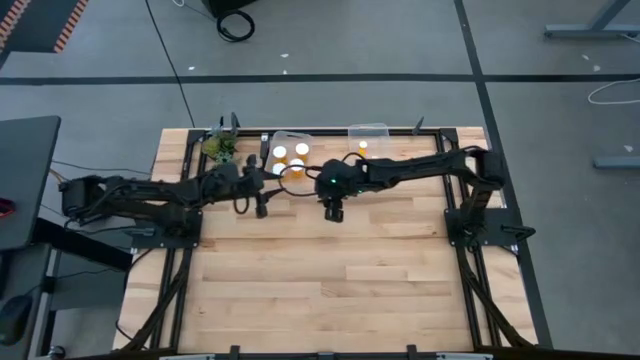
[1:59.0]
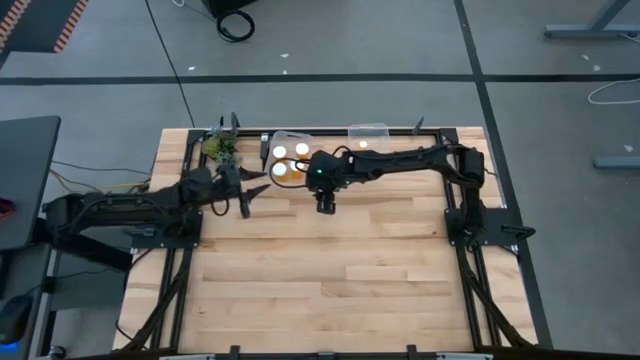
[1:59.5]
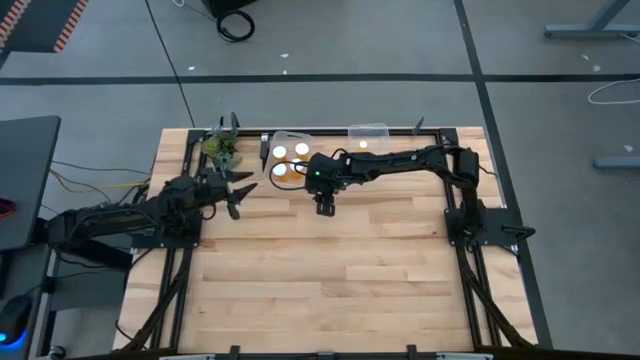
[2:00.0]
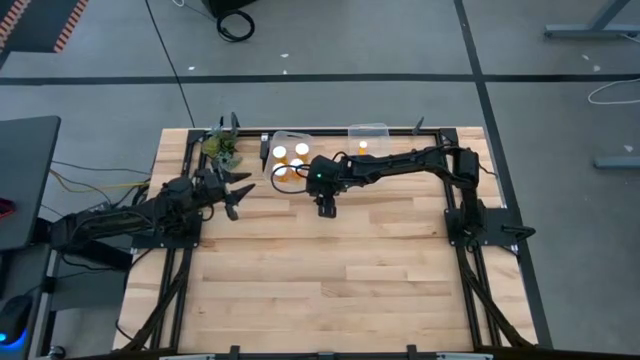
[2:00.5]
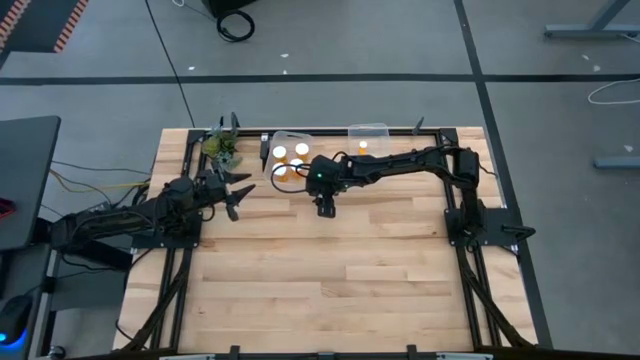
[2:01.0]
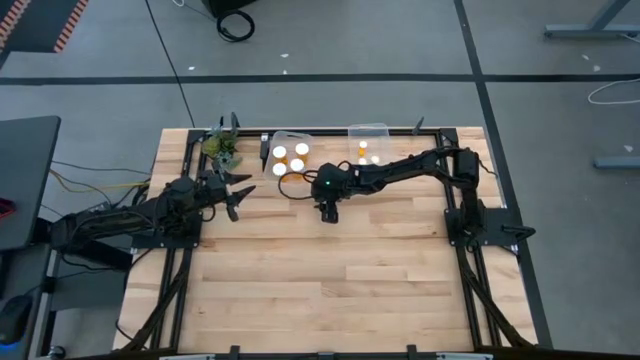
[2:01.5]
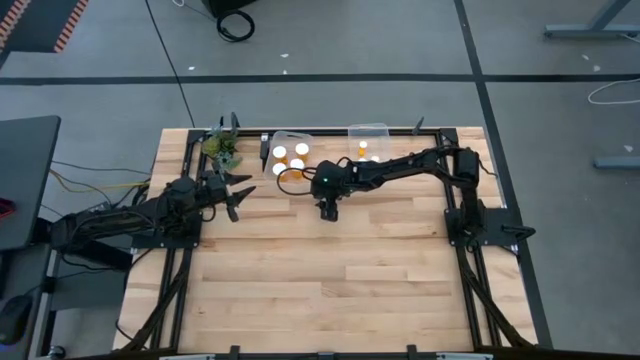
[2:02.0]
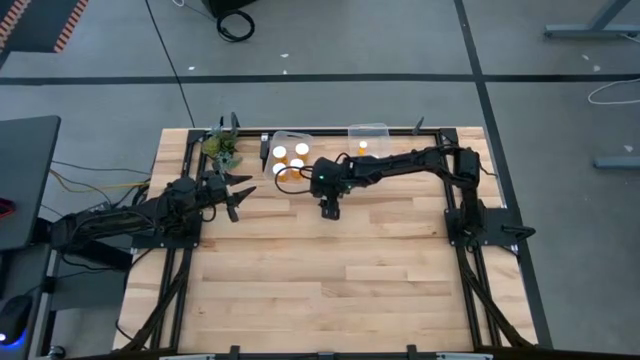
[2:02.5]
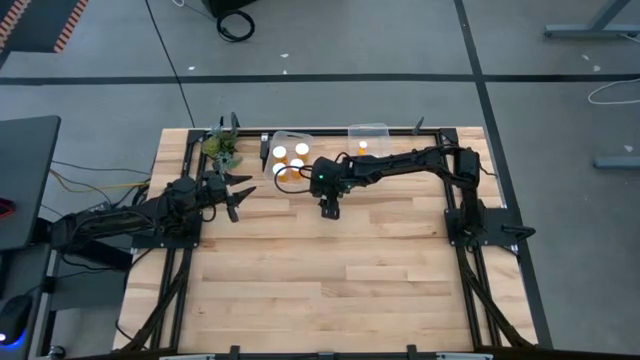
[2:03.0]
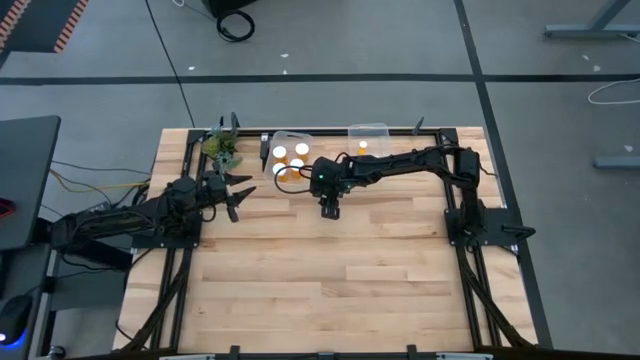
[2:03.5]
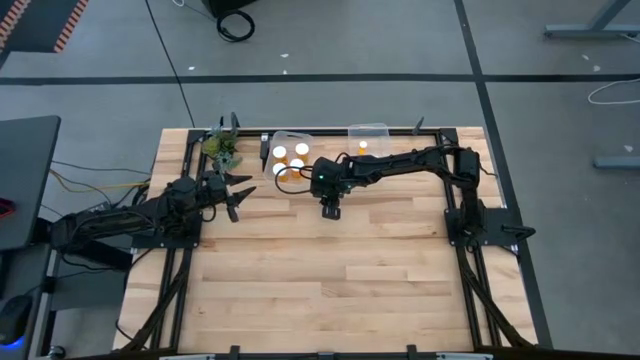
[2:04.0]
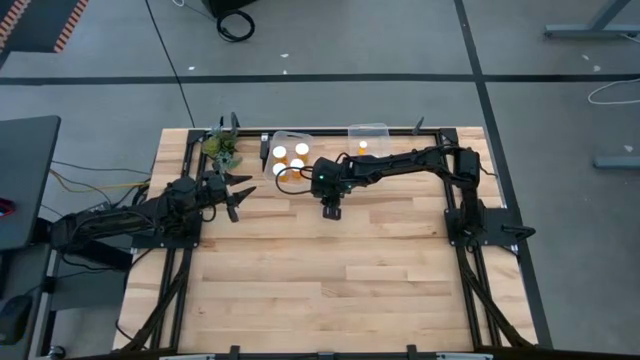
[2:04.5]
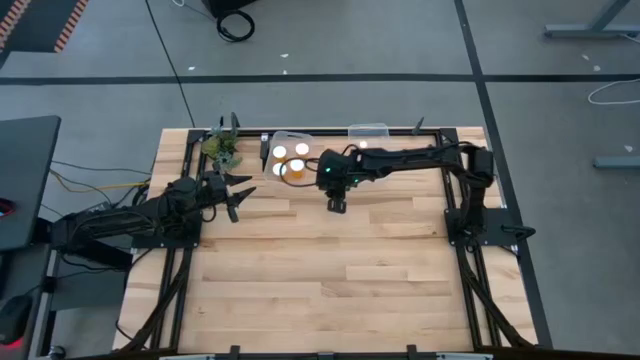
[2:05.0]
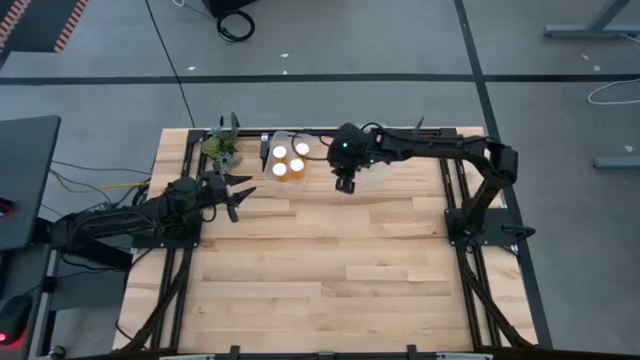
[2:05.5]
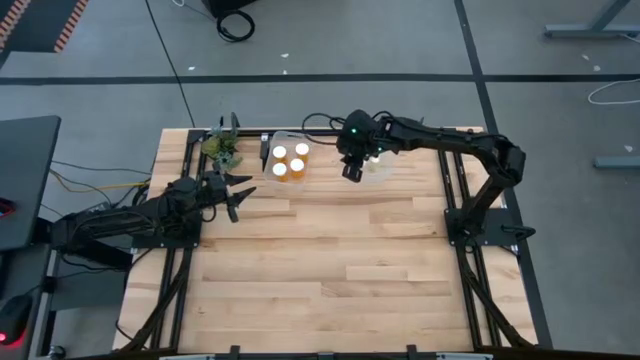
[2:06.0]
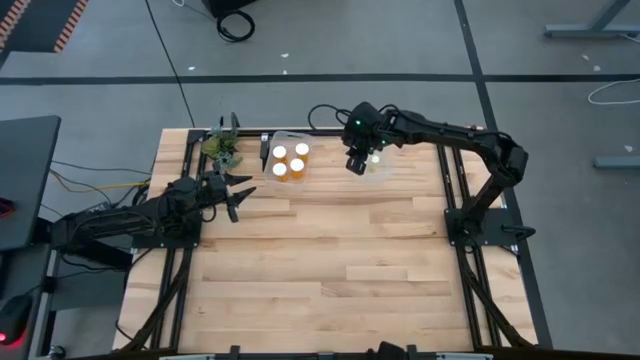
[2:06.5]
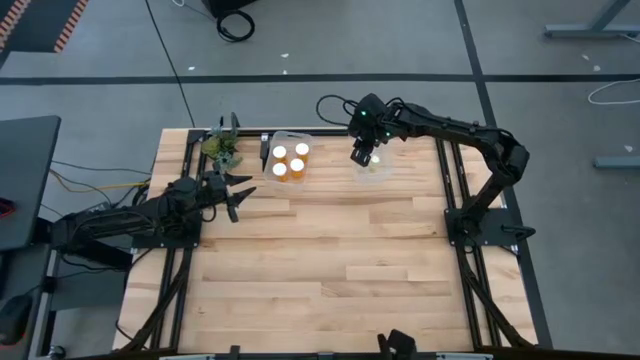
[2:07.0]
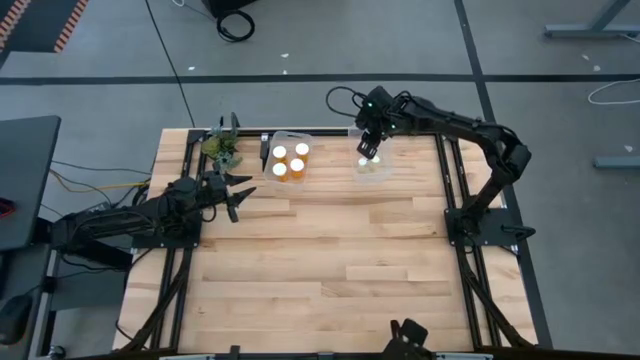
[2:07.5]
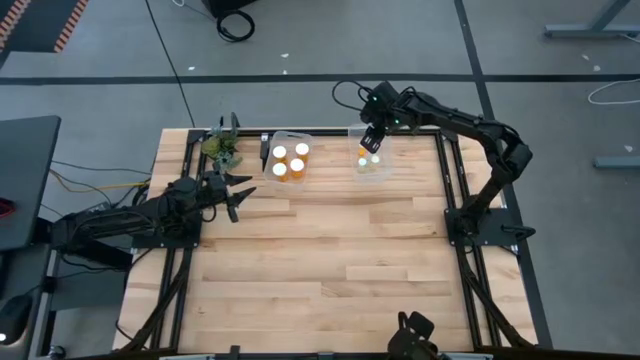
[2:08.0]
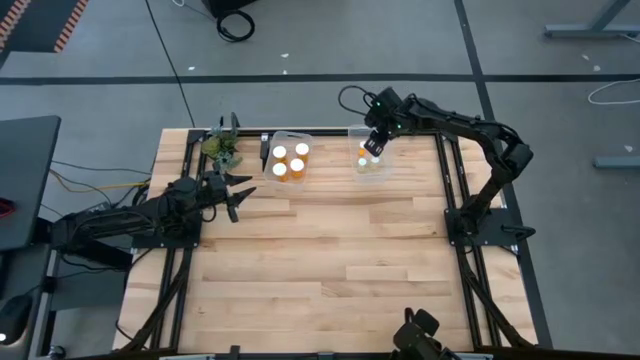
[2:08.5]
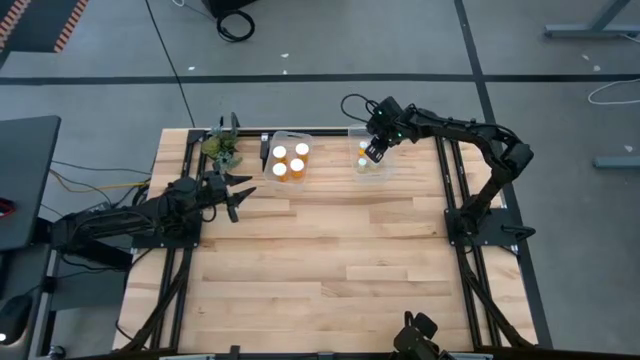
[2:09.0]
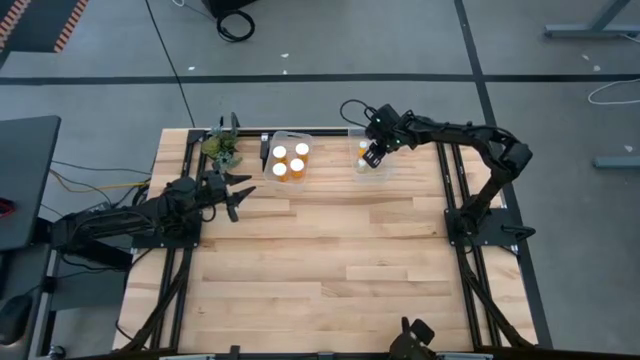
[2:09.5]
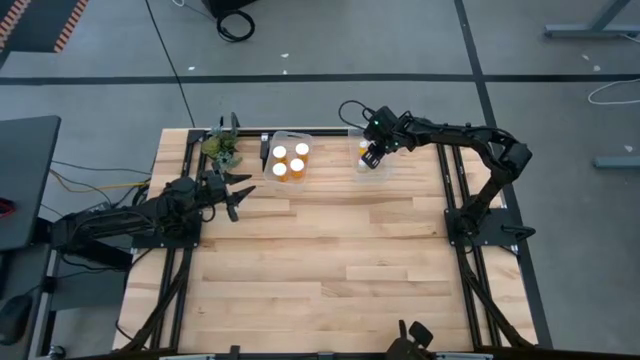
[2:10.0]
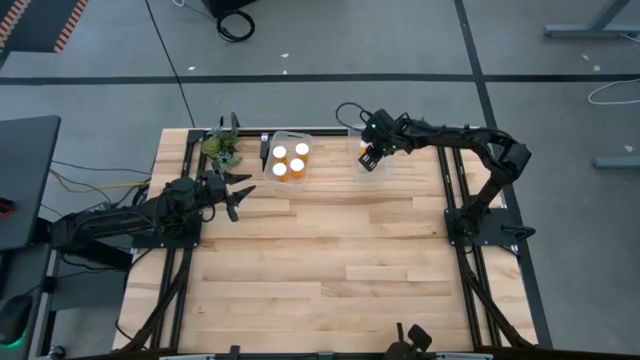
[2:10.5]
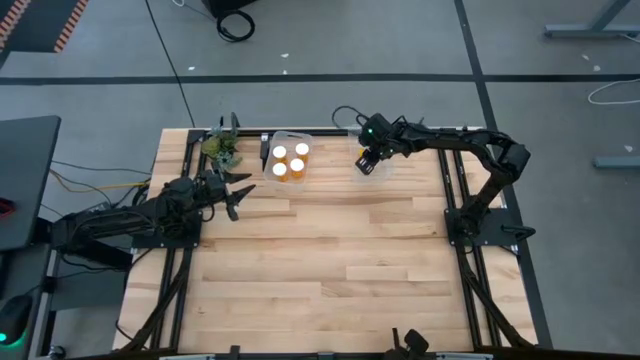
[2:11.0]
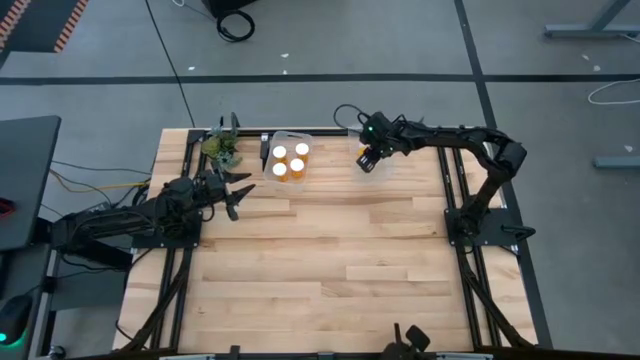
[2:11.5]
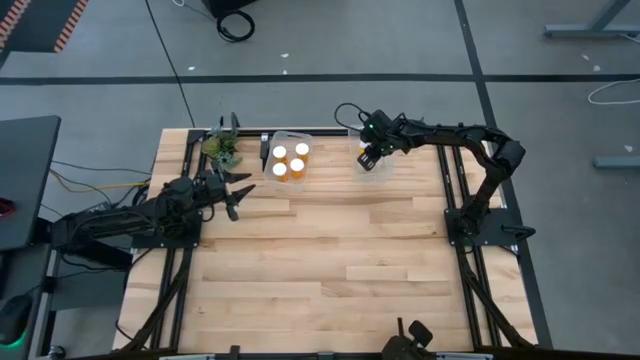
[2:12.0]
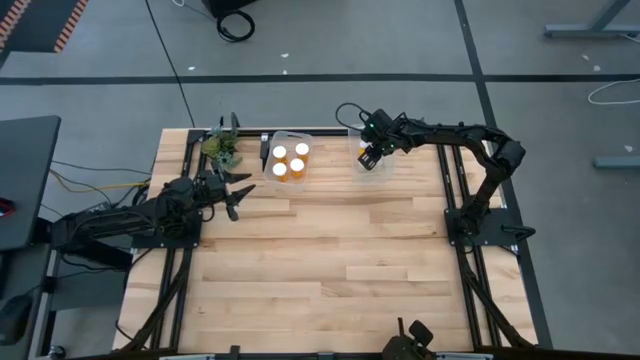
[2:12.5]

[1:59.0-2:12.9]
Task: Pick and place medicine bottles into bin by pill shape (circle, oval)
Put the small yellow pill bottle into the right transparent bin

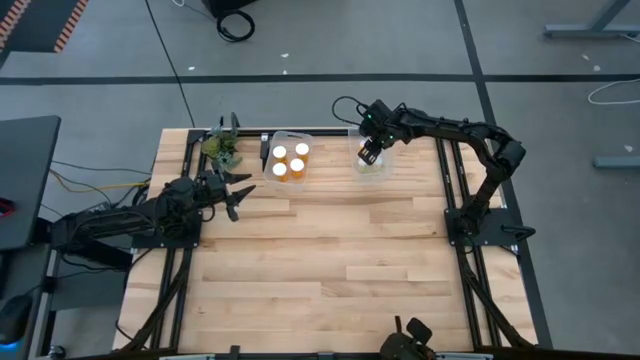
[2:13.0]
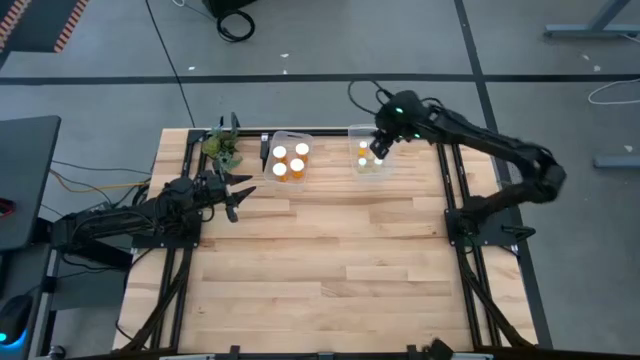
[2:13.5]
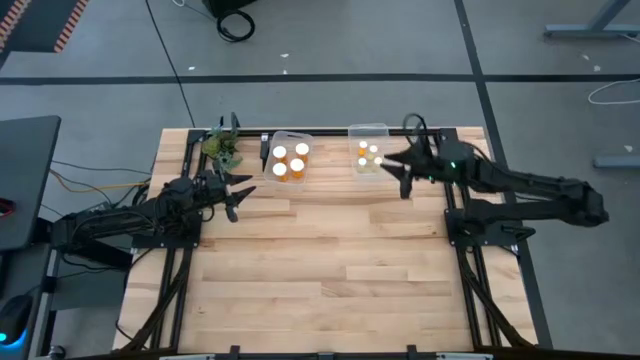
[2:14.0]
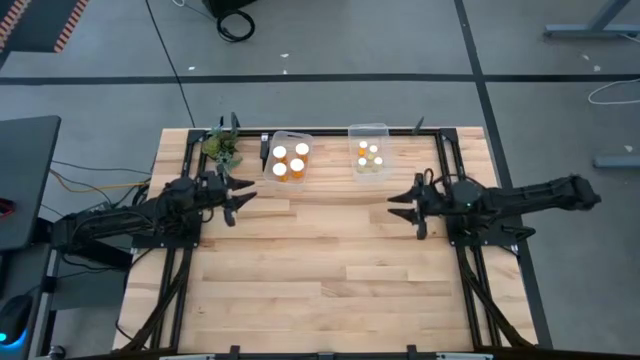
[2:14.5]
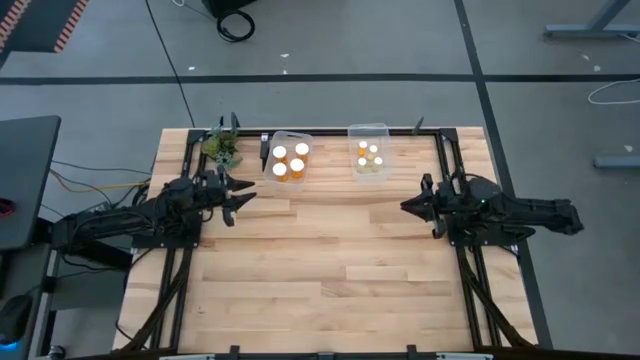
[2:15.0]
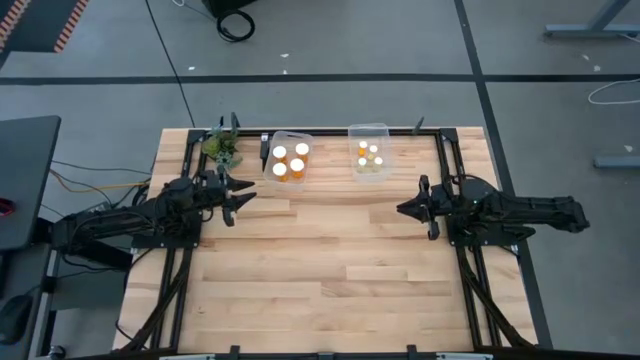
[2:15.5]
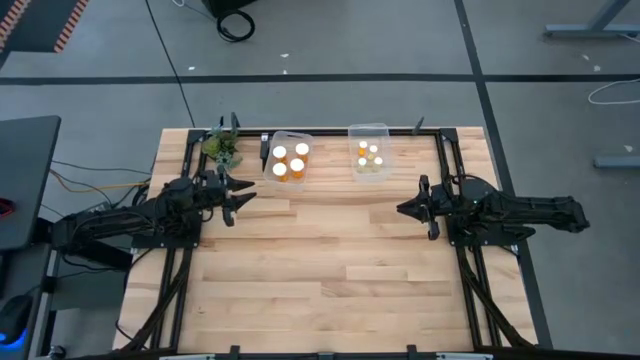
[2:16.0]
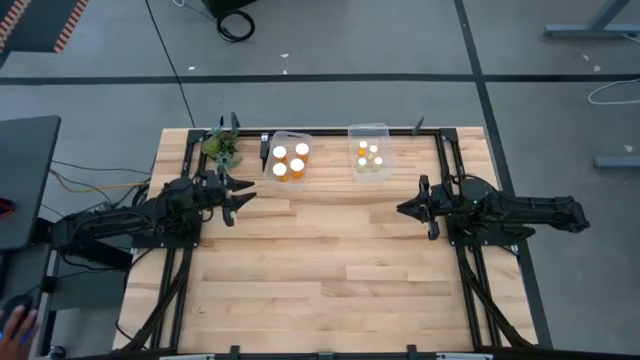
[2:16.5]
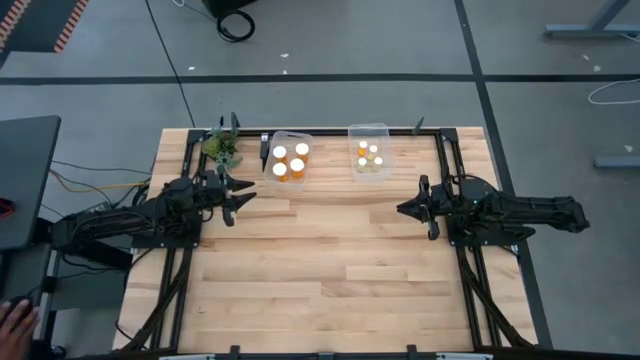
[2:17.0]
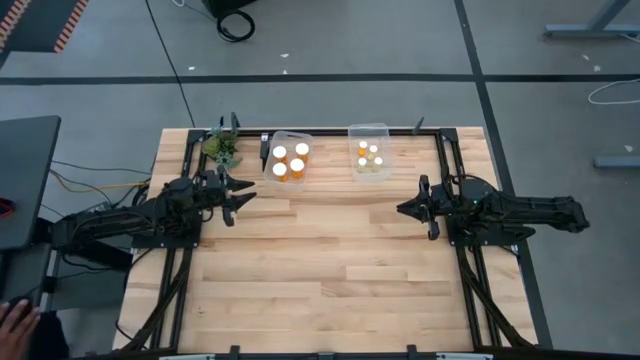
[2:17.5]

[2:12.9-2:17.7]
Return to Home Position

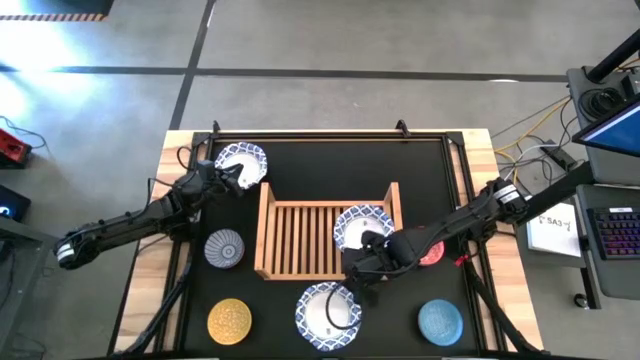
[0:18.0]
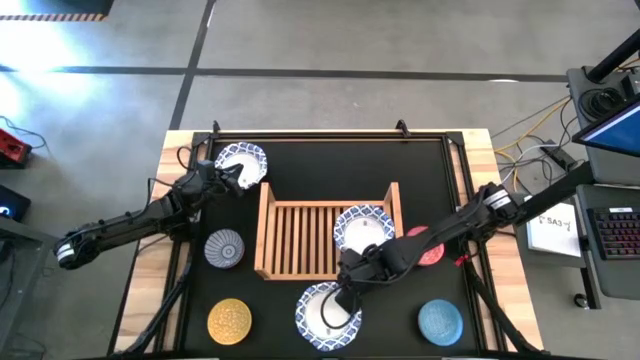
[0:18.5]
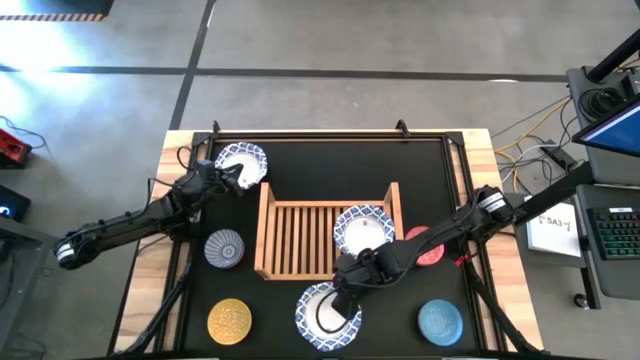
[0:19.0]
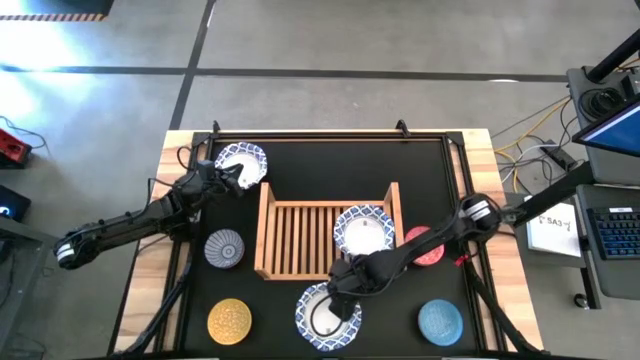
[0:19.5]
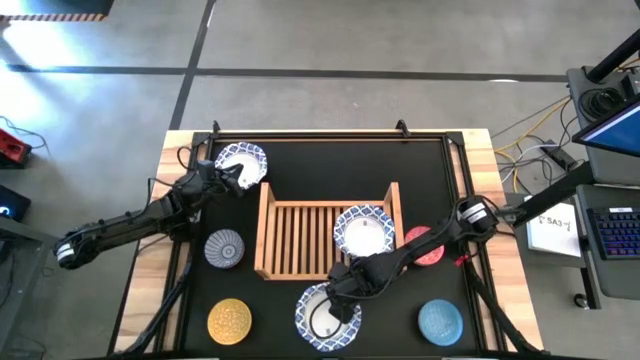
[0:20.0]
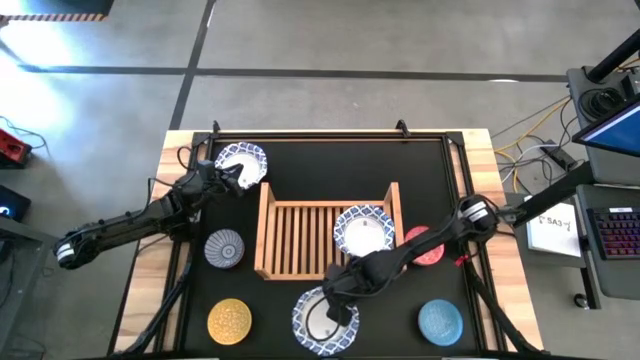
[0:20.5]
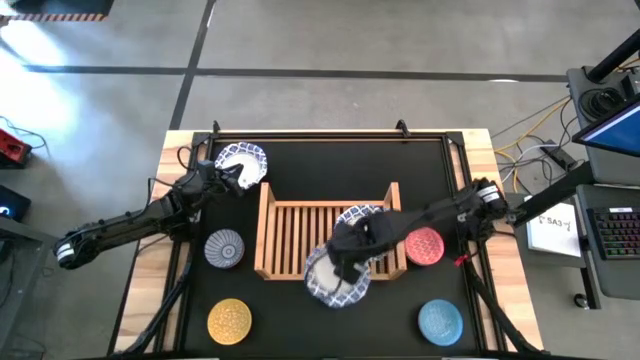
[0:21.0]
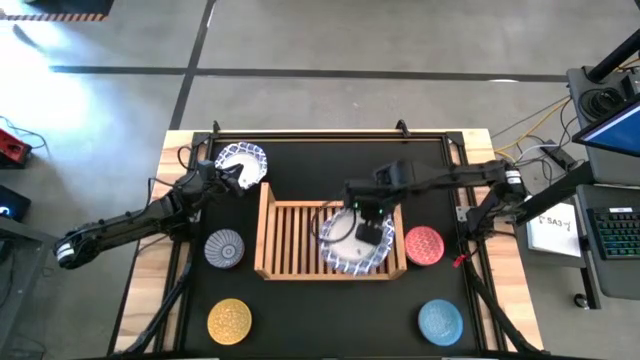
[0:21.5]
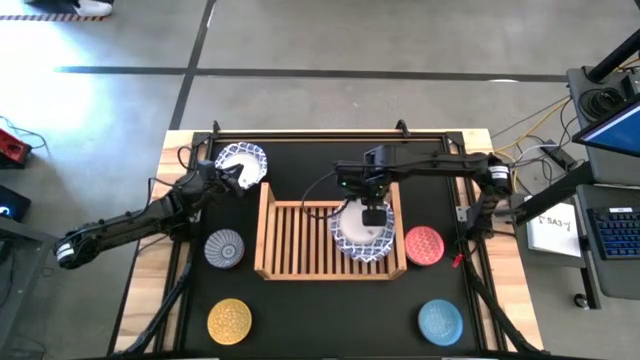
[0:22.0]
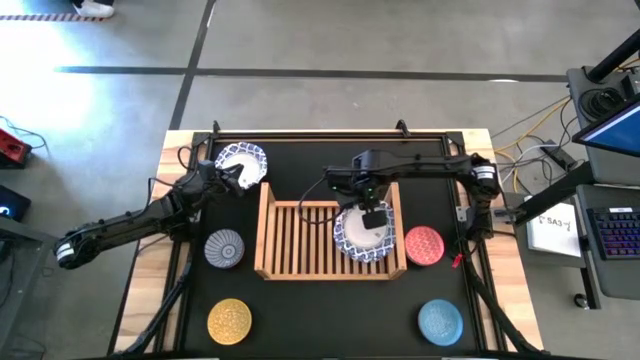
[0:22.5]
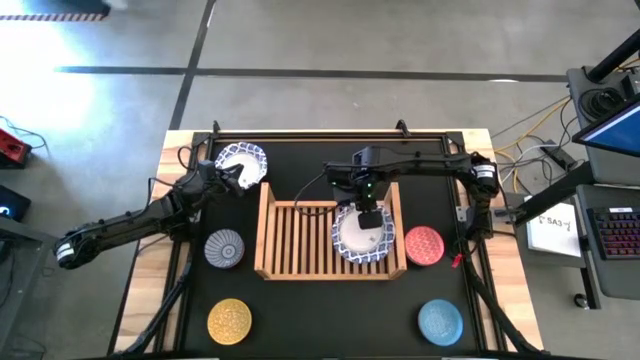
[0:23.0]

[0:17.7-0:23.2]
Task: Place and stack bowls onto a shelf
Stack the bottom white bowl on top of the other white bowls on the shelf
